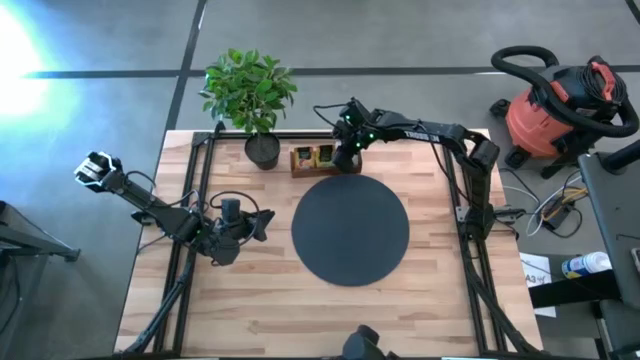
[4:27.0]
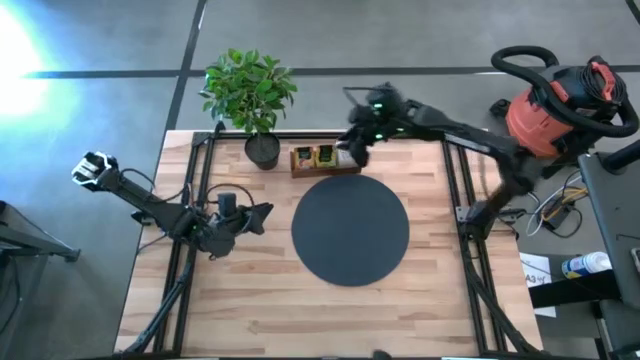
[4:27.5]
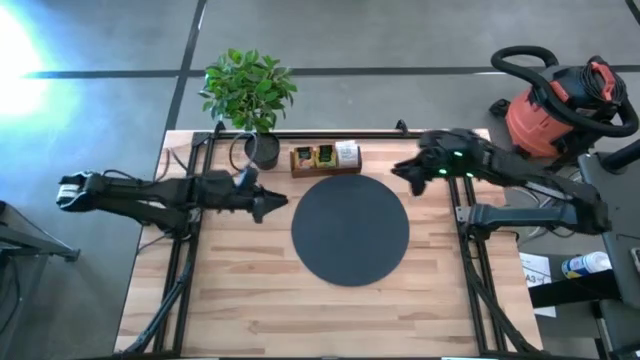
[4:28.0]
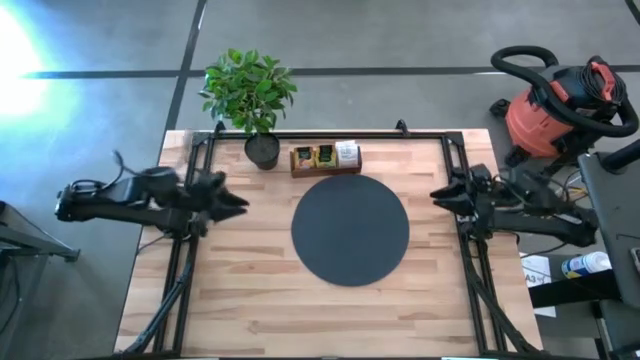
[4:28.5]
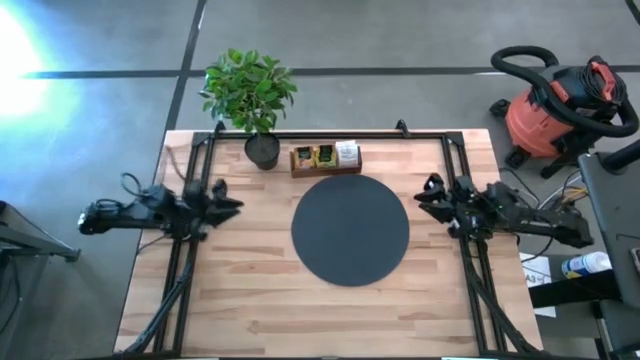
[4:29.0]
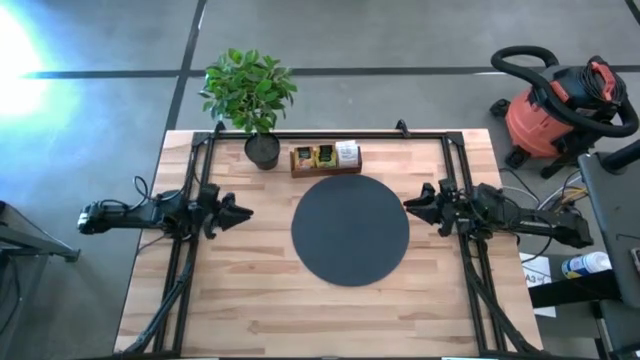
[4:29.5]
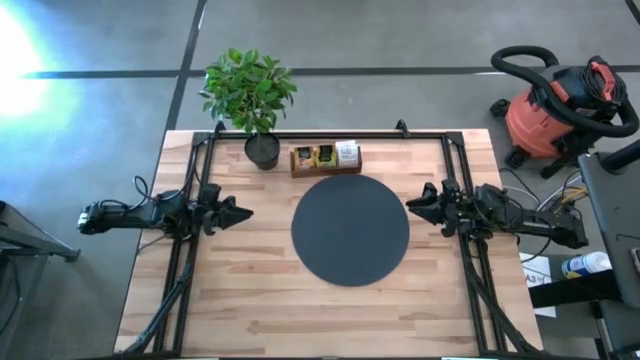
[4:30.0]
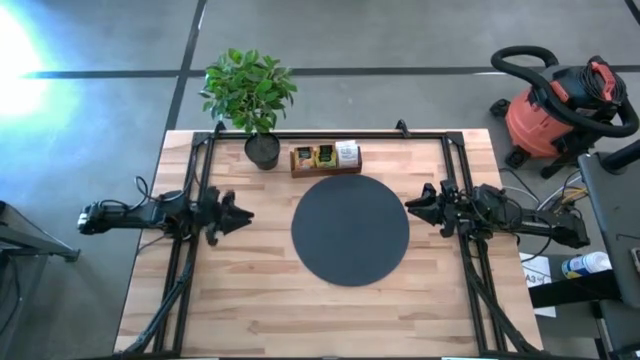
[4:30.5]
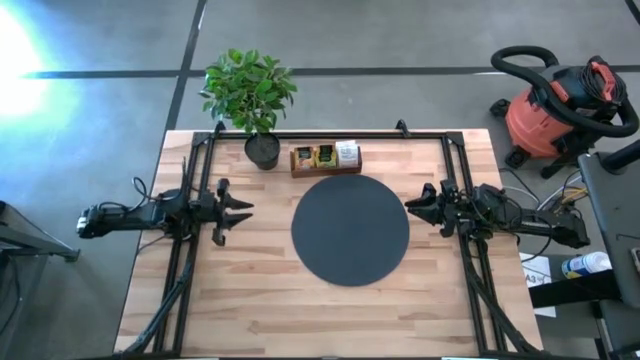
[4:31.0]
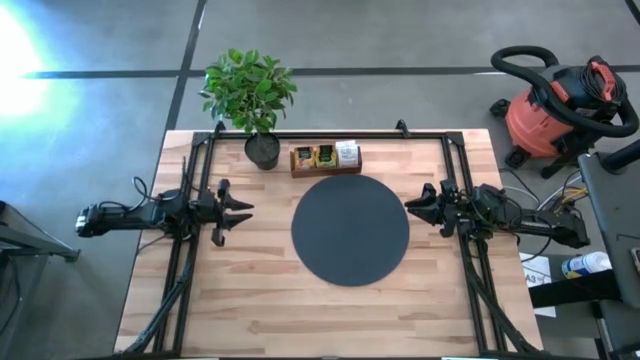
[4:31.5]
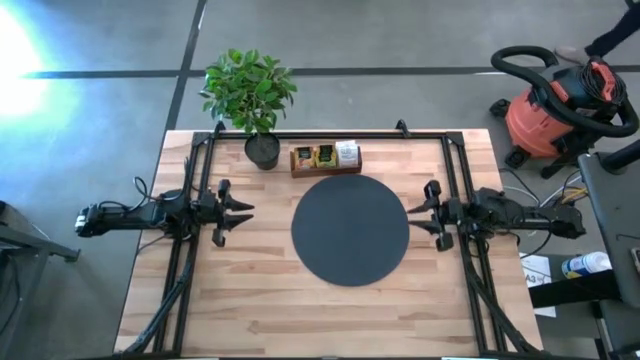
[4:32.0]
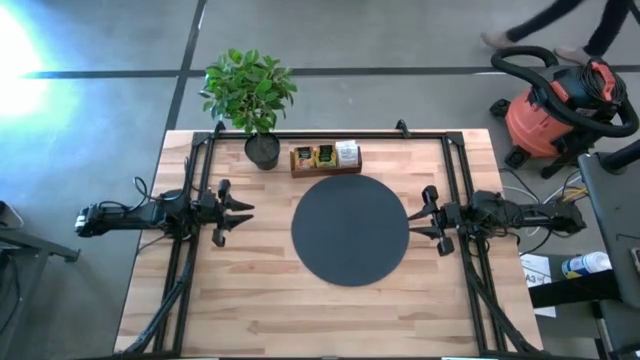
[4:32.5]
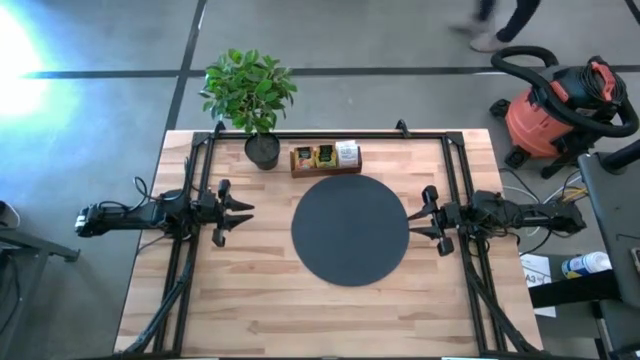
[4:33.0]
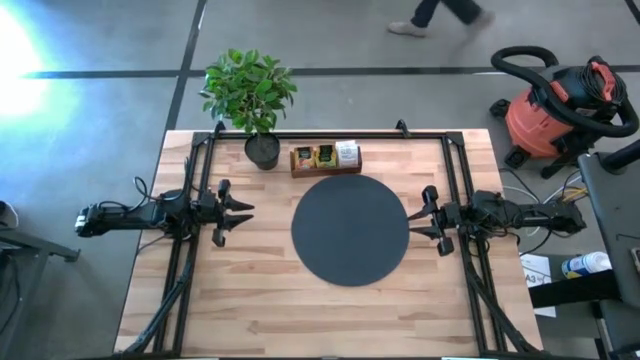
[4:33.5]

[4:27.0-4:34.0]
Task: Pick & Place Tea
Return to Home Position

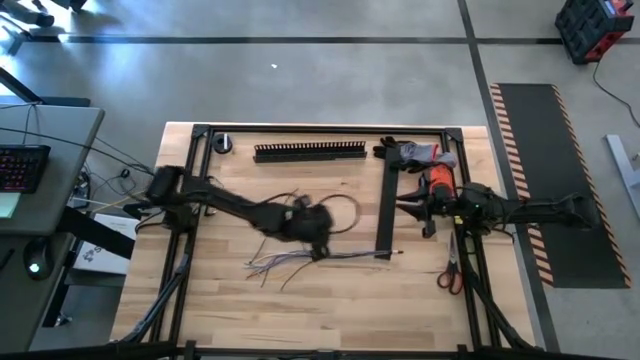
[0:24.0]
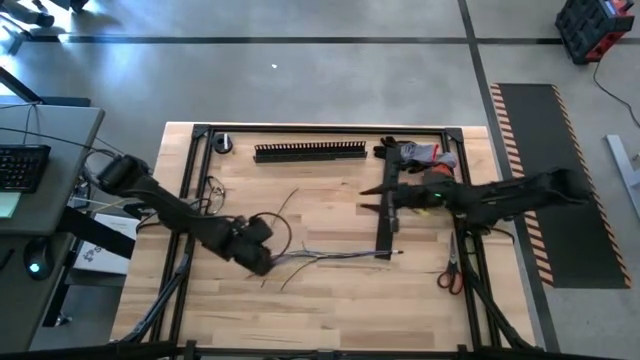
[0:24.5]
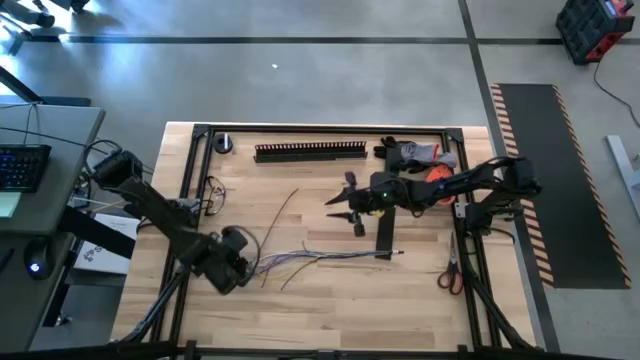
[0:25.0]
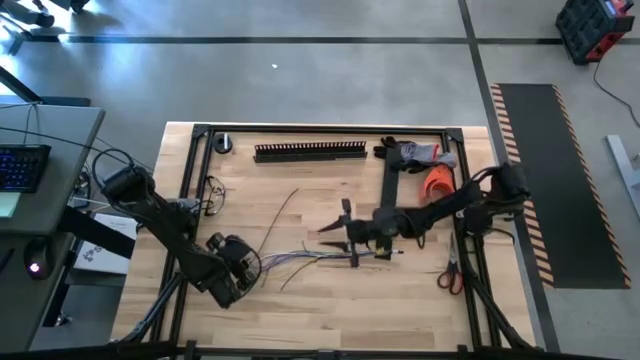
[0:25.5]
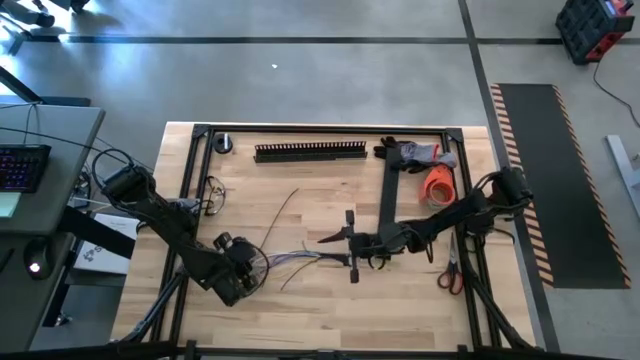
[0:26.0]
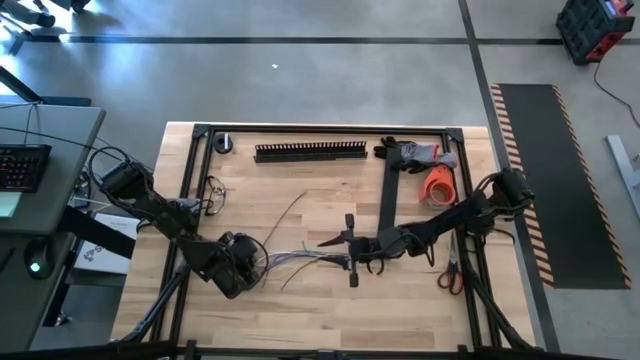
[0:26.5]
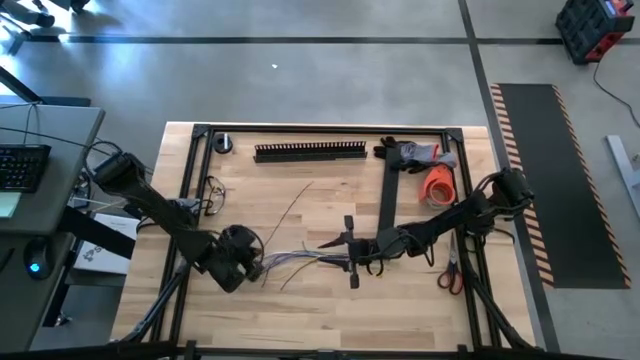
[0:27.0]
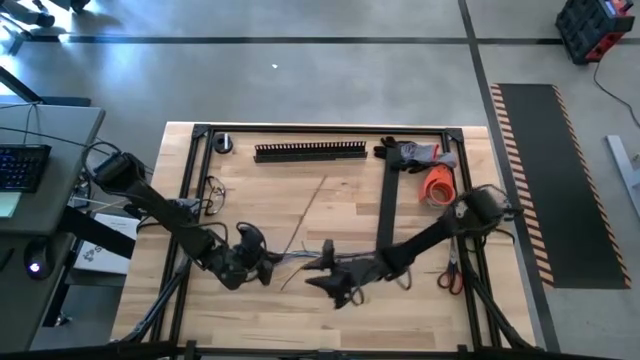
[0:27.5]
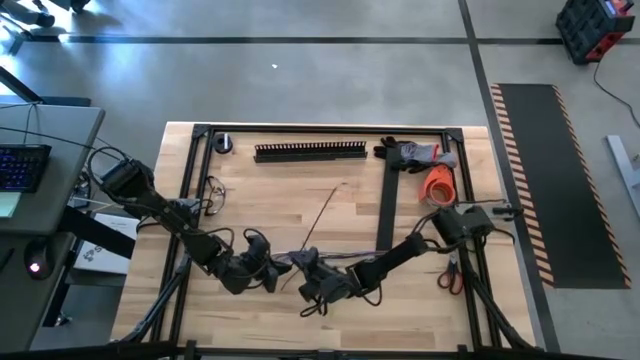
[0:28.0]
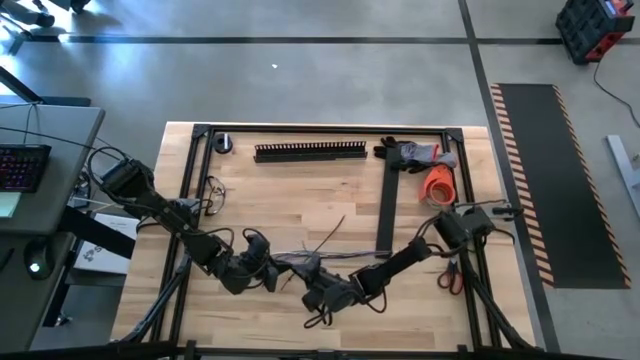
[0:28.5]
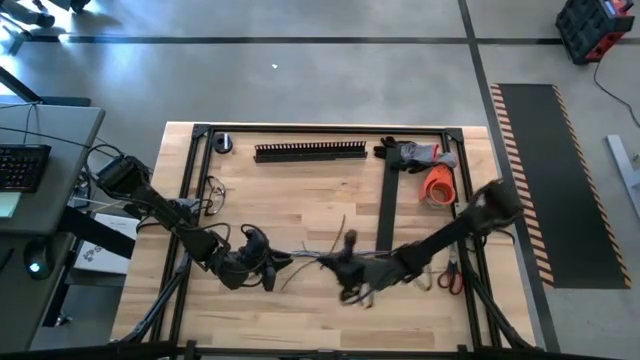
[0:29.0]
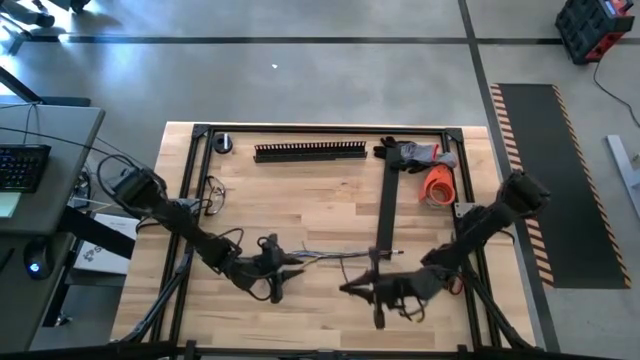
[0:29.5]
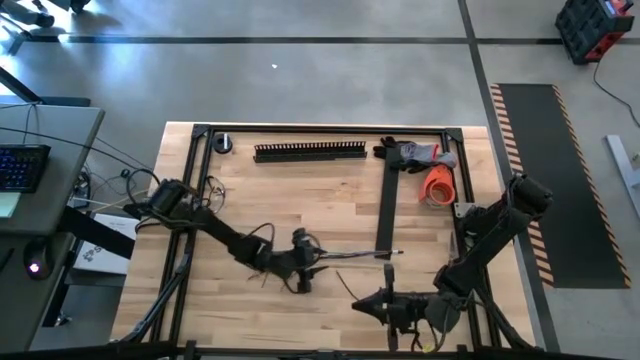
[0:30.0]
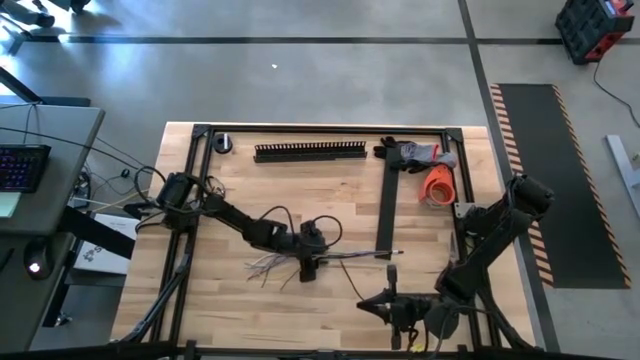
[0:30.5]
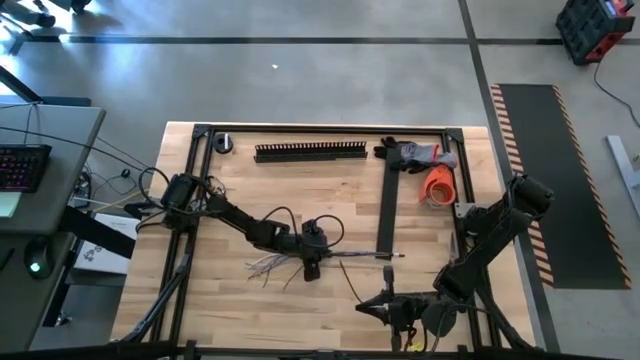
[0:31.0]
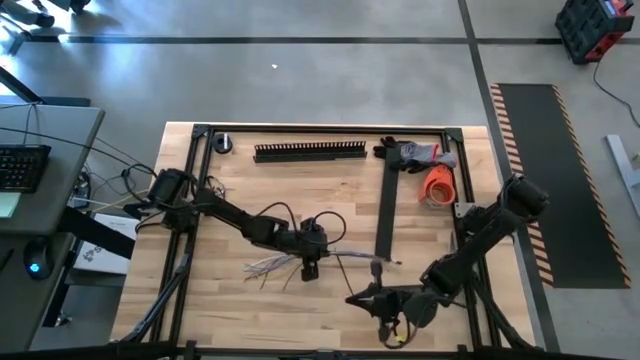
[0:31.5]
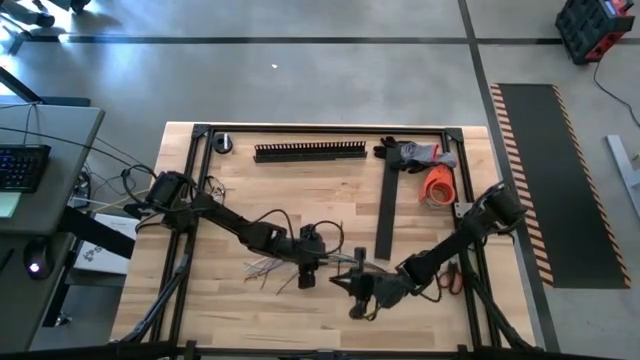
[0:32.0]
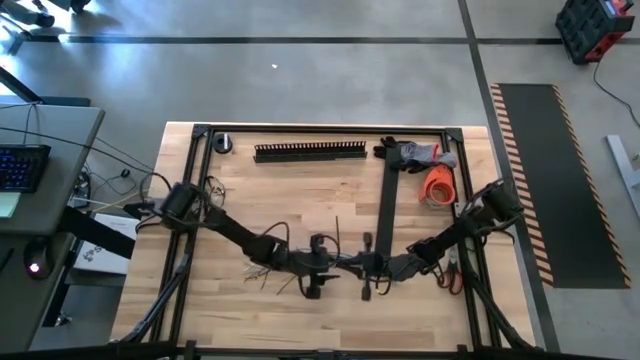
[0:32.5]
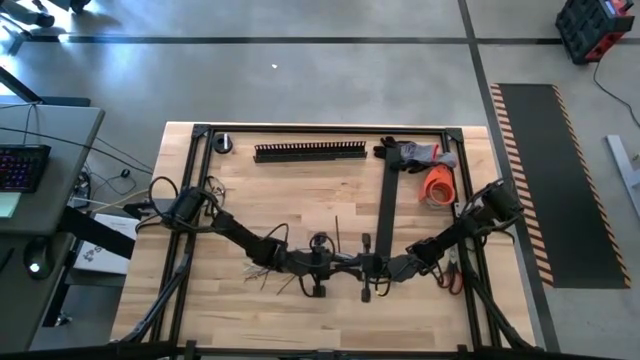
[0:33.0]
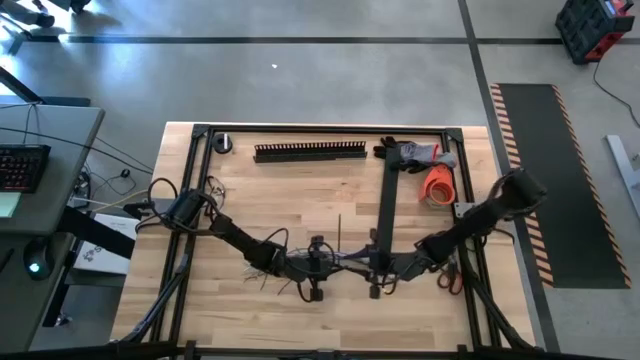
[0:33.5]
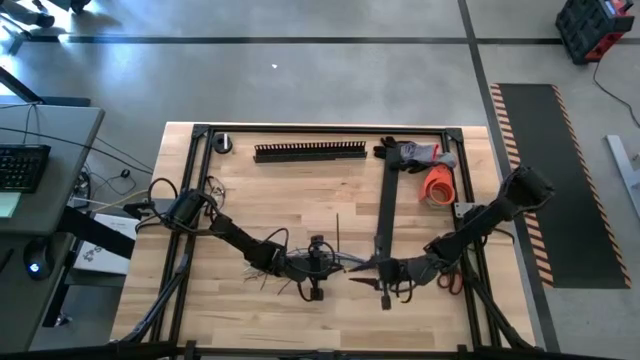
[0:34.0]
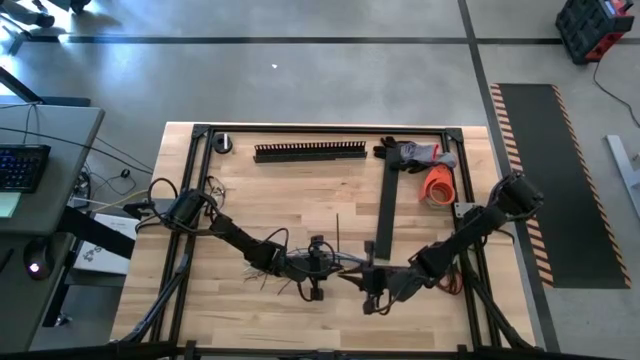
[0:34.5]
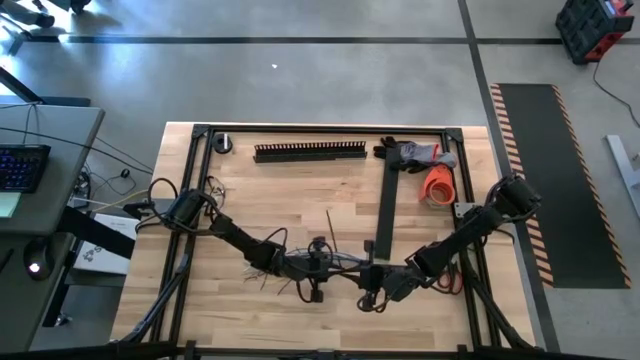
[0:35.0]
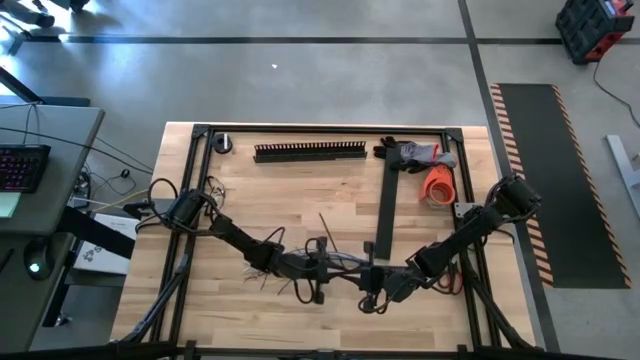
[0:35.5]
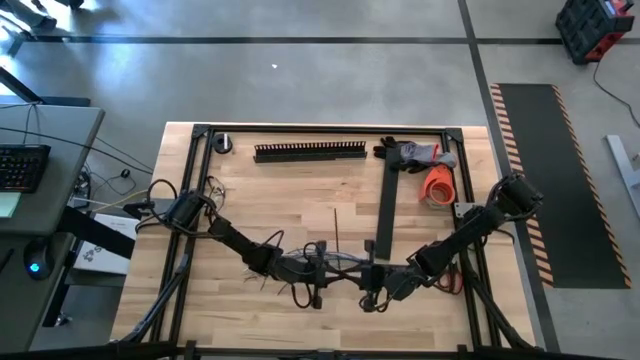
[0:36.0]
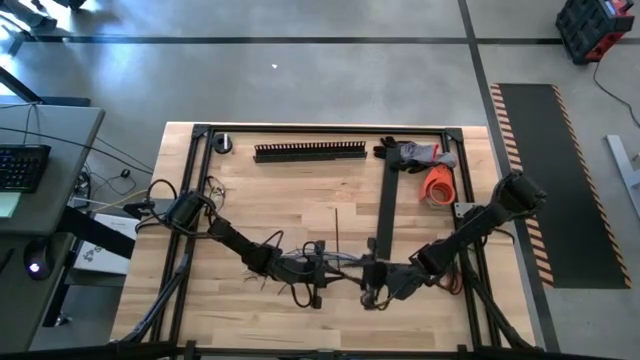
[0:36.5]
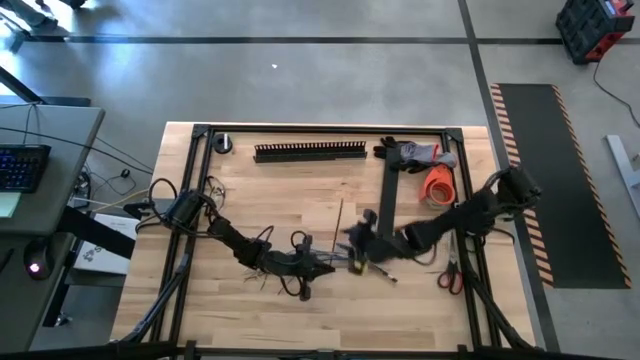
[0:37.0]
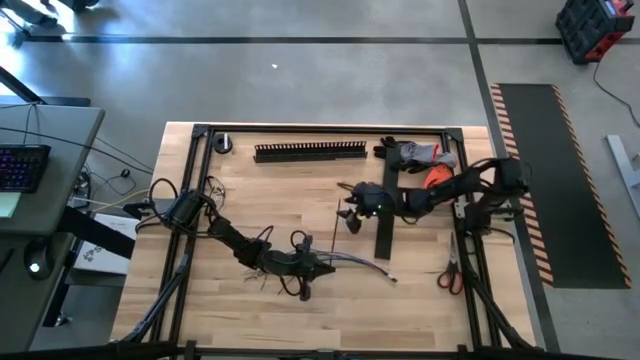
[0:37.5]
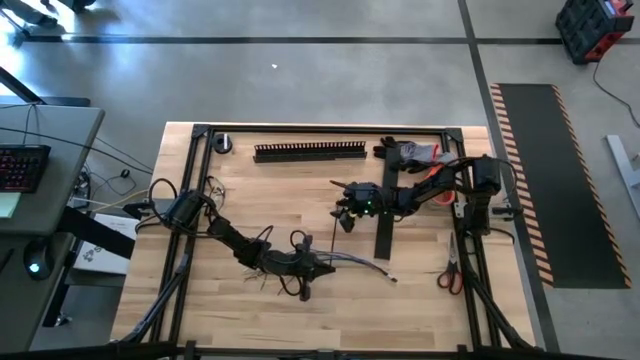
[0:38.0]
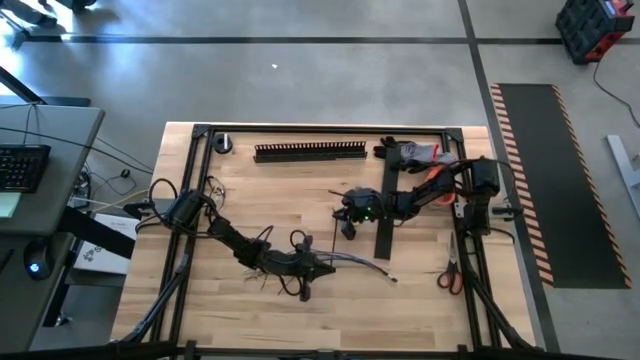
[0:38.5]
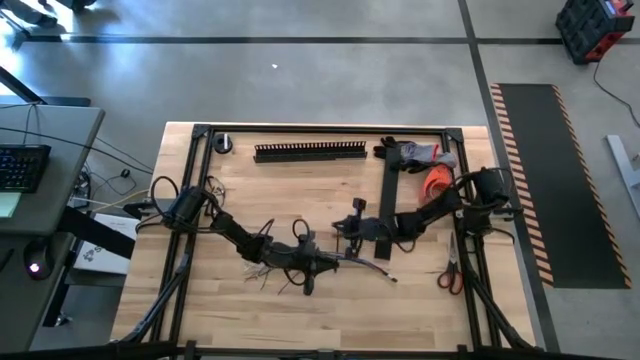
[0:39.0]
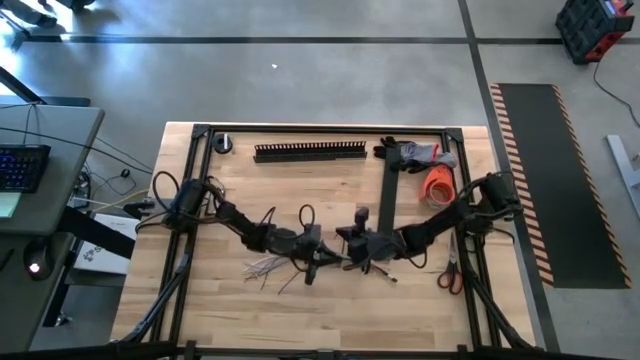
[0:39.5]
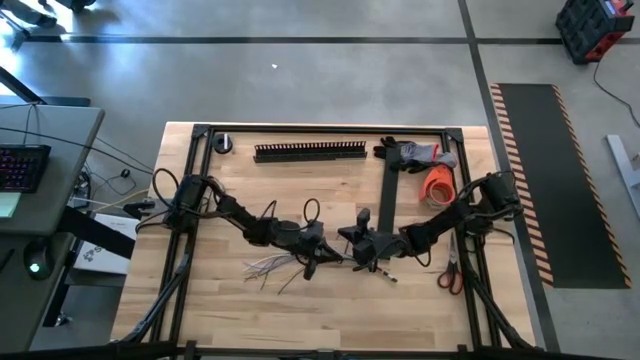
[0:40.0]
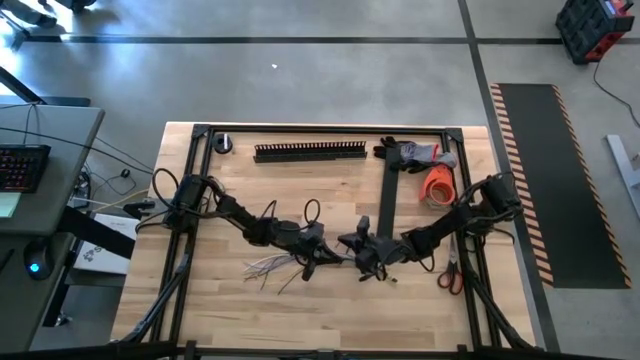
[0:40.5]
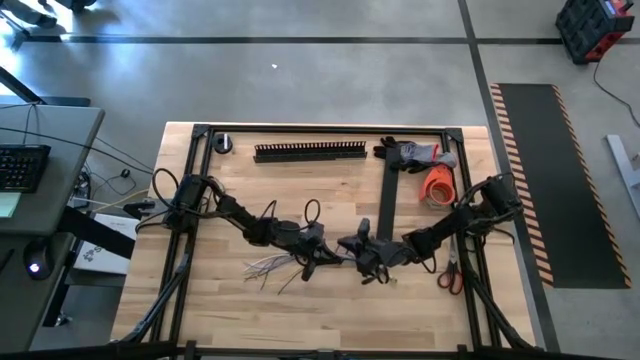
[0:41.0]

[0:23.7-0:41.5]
Task: Ziptie cables
Wrap the cable wires using the black zip tie
